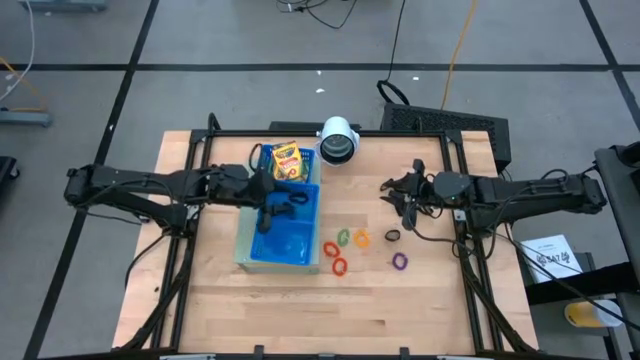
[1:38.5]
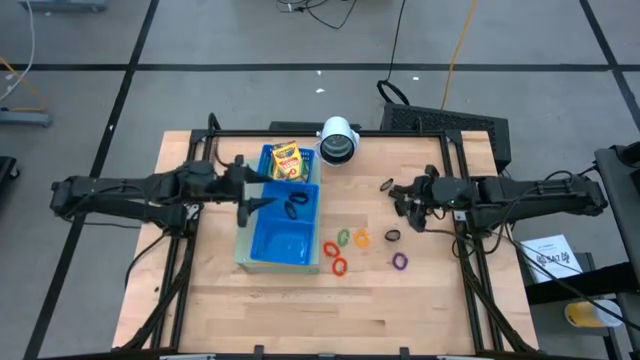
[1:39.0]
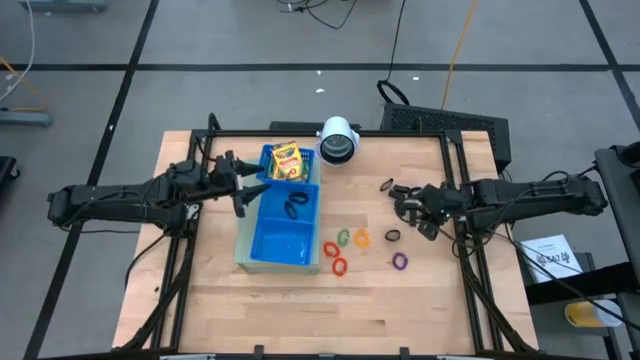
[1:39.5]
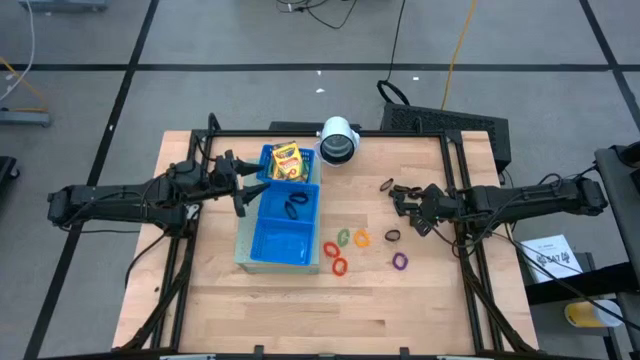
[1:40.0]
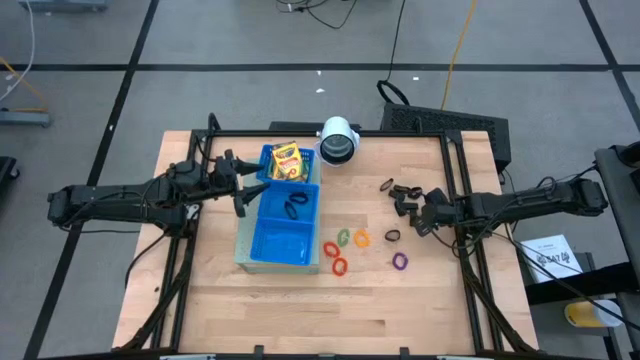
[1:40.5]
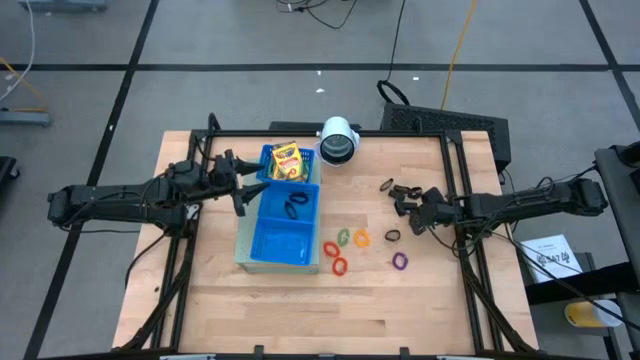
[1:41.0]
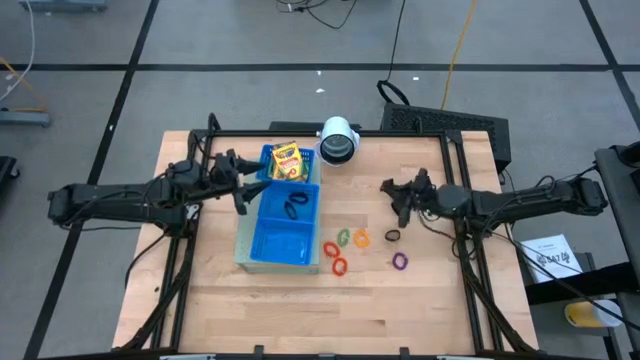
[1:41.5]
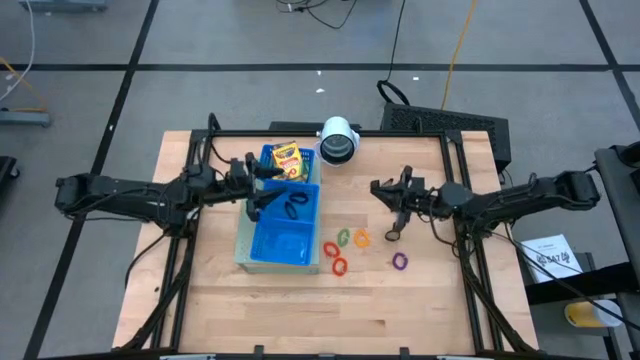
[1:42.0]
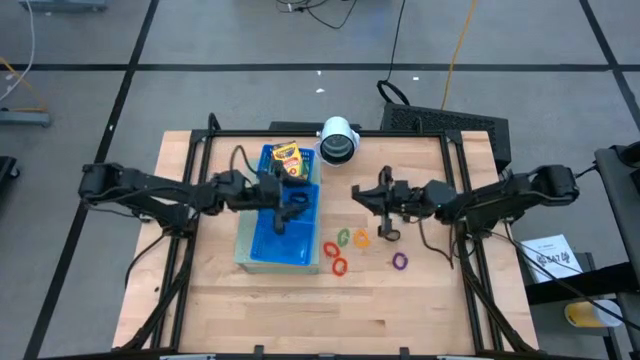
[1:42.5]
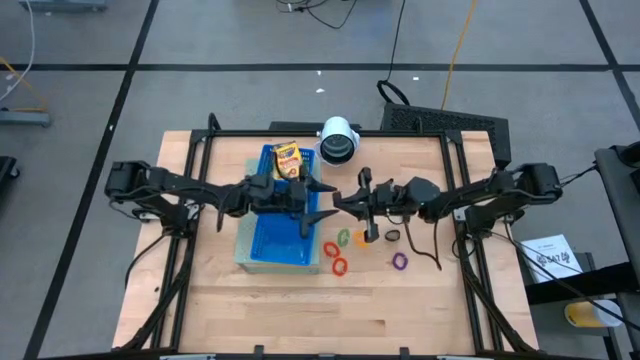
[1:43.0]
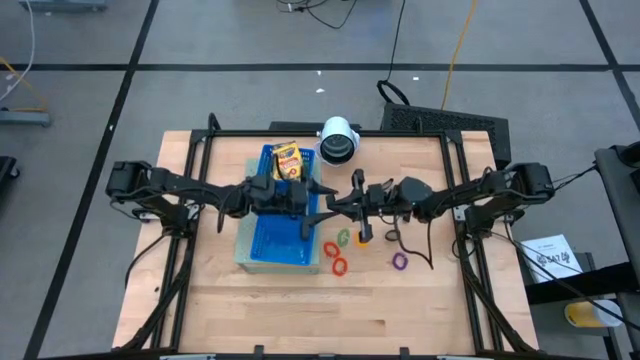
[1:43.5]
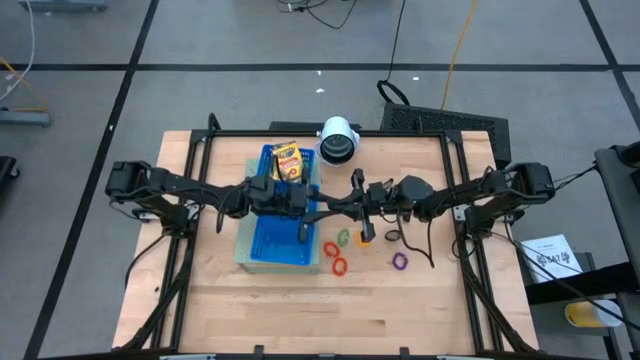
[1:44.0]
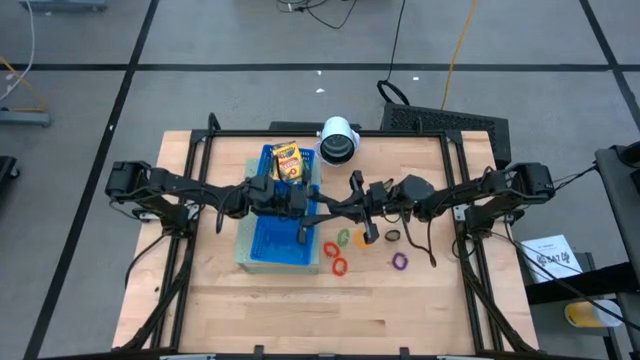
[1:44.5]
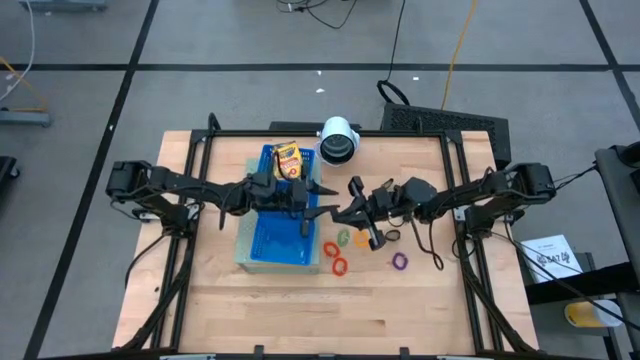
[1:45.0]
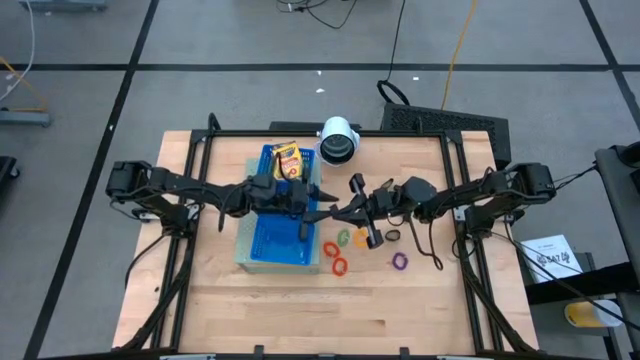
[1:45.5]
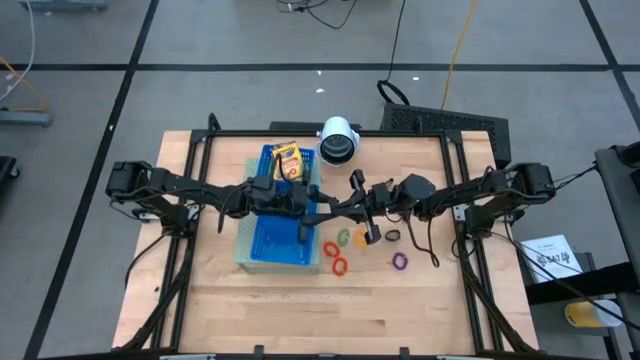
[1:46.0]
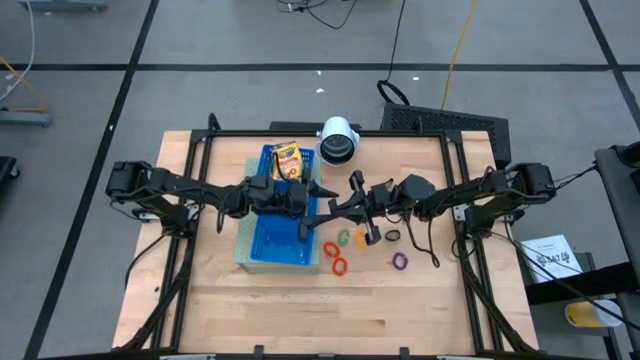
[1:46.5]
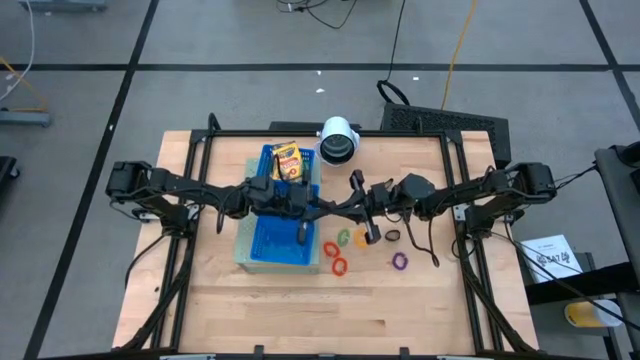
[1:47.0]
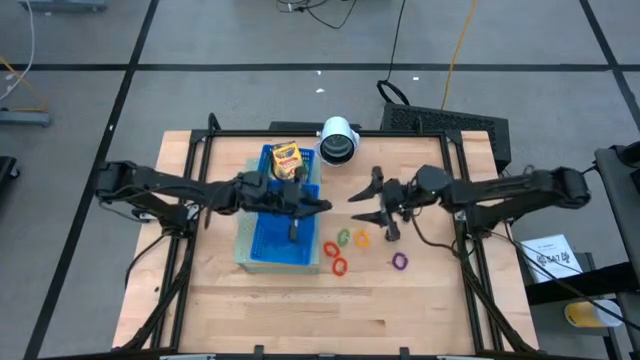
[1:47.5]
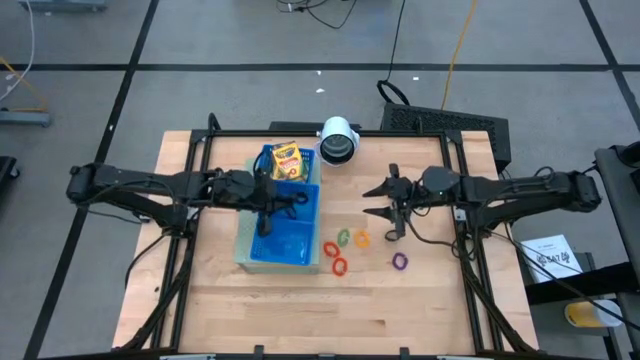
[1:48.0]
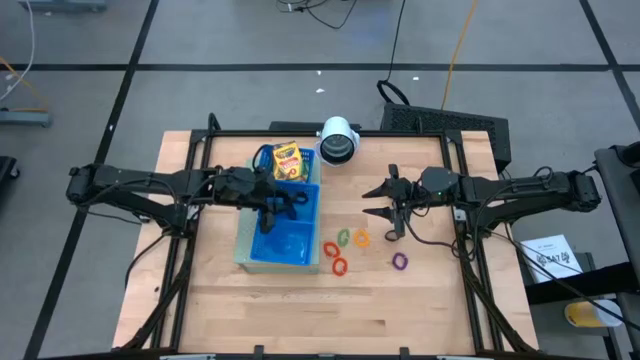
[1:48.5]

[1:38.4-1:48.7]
Task: Pick & Place Office Desk Supplies
Put the black rubber band into the middle blue bin on the shelf

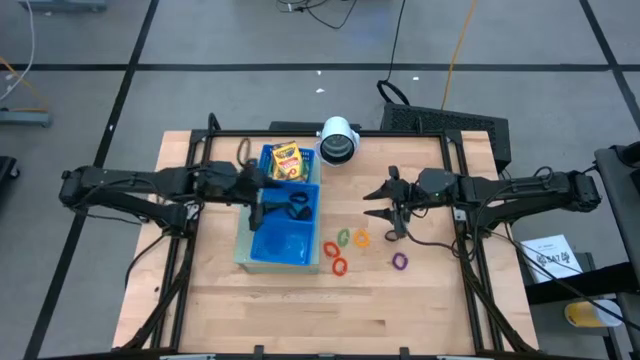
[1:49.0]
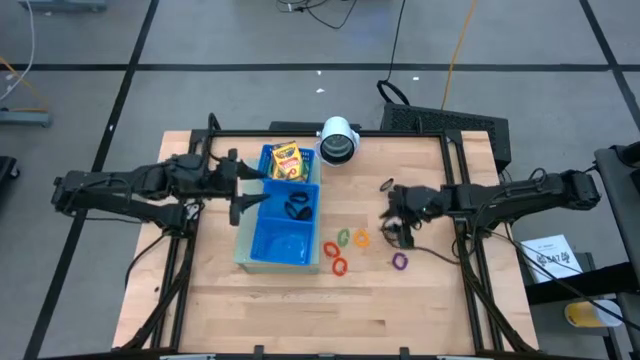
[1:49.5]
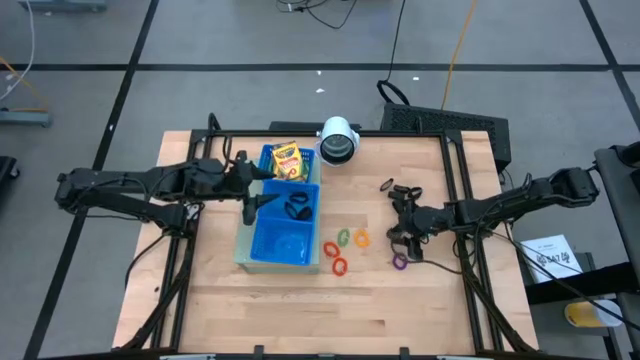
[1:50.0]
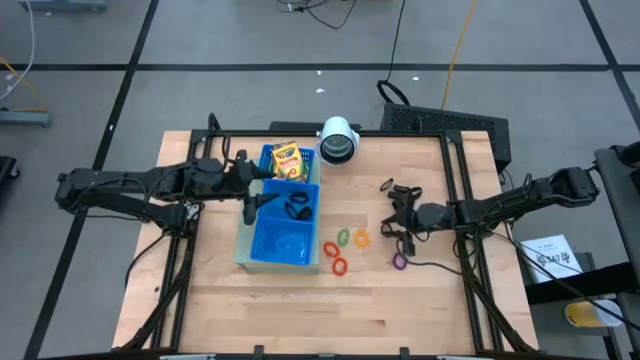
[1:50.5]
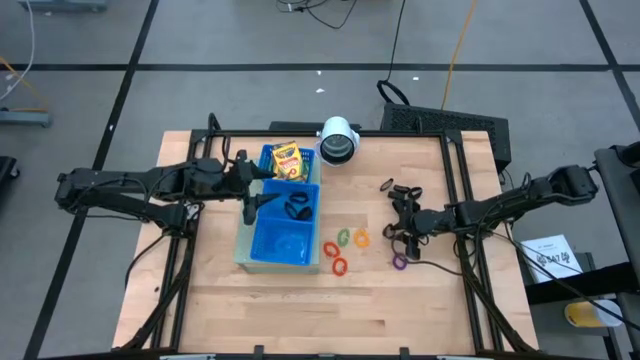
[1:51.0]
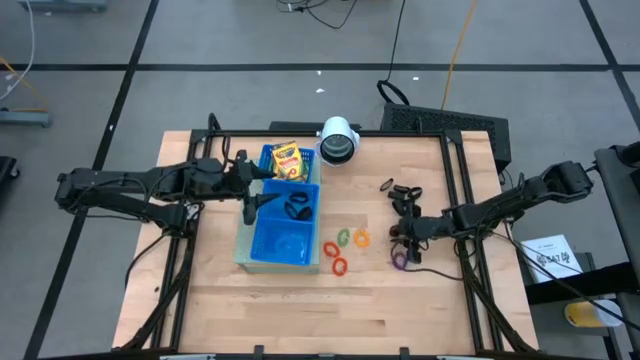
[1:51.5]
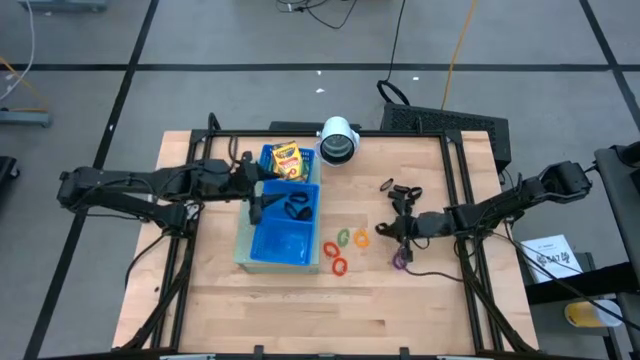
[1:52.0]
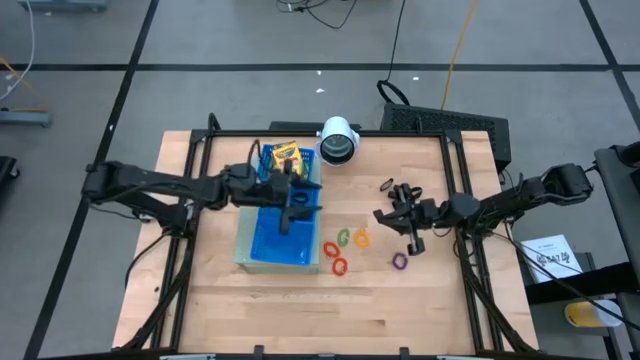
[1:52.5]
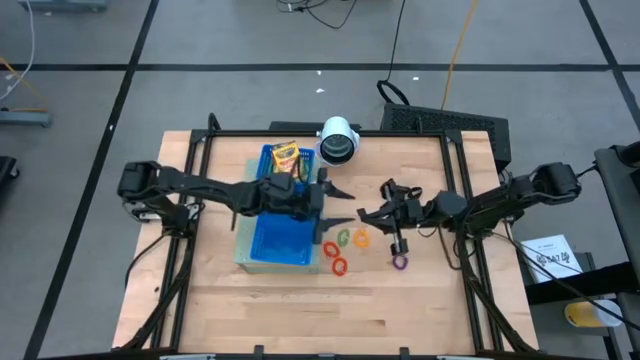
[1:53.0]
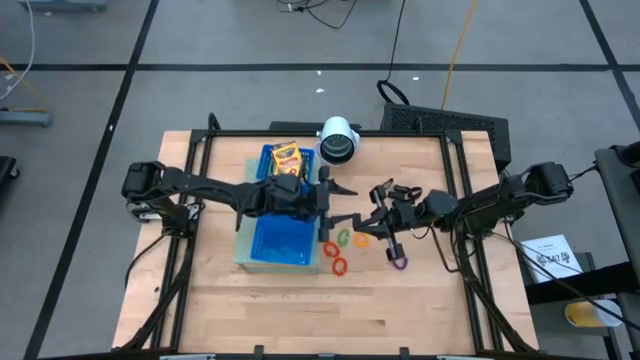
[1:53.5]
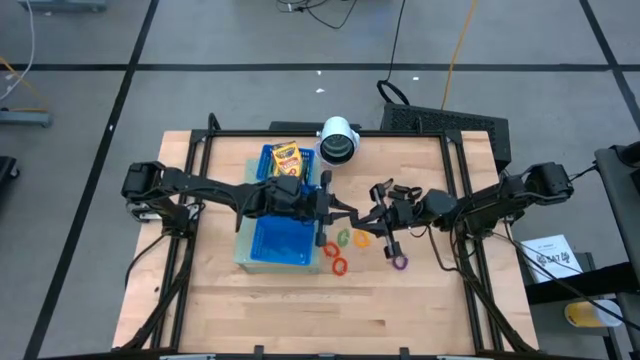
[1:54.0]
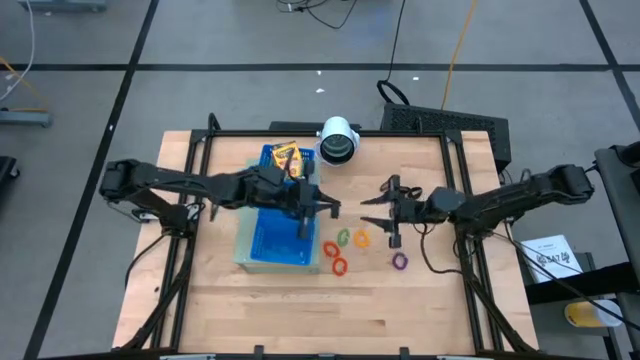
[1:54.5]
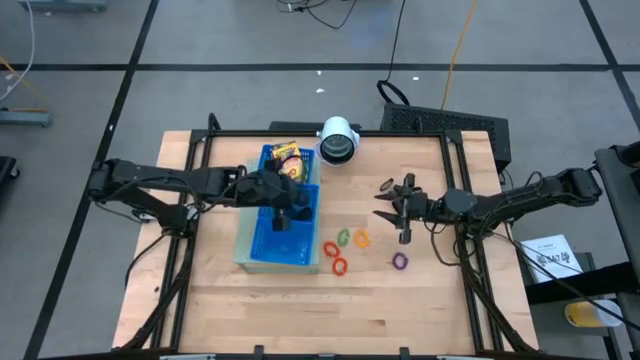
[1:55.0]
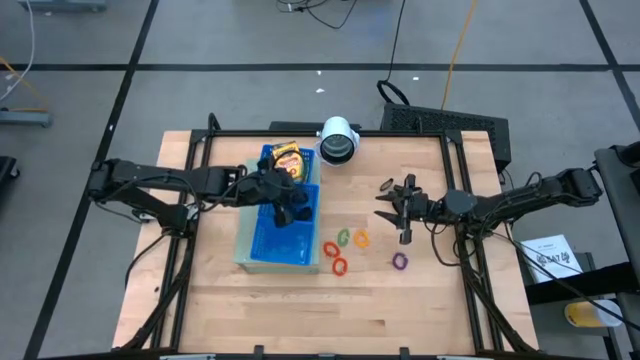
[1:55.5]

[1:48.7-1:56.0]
Put the black rubber band into the middle blue bin on the shelf

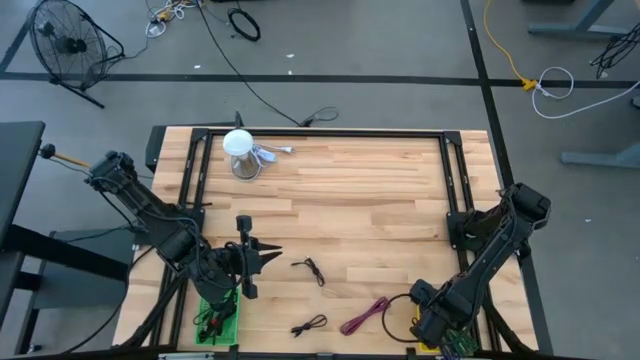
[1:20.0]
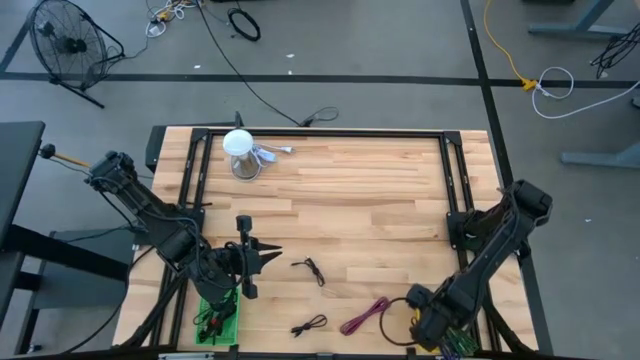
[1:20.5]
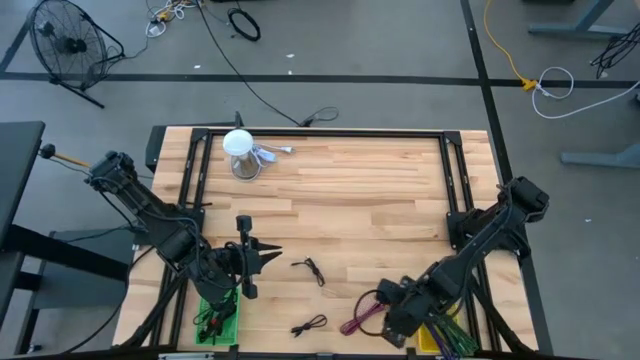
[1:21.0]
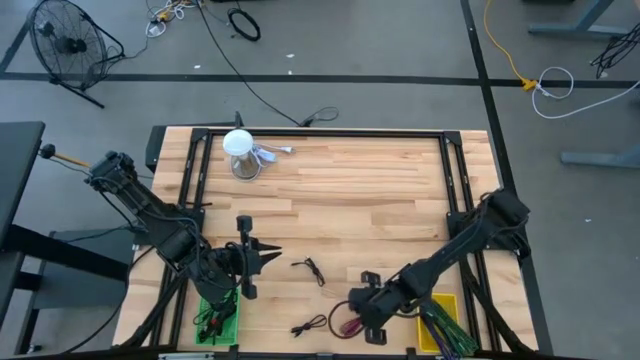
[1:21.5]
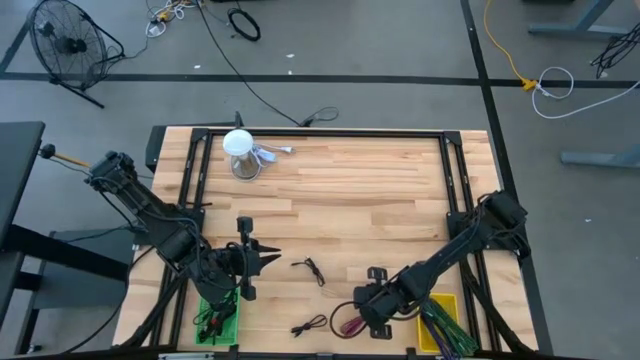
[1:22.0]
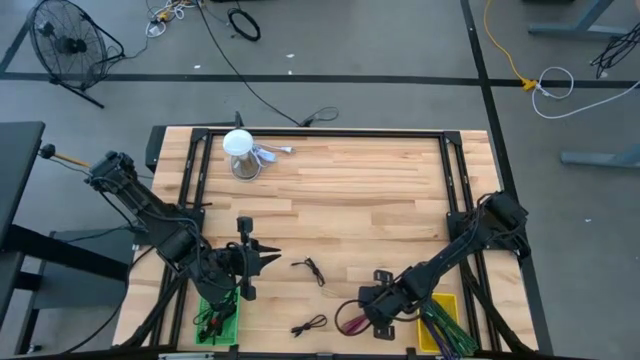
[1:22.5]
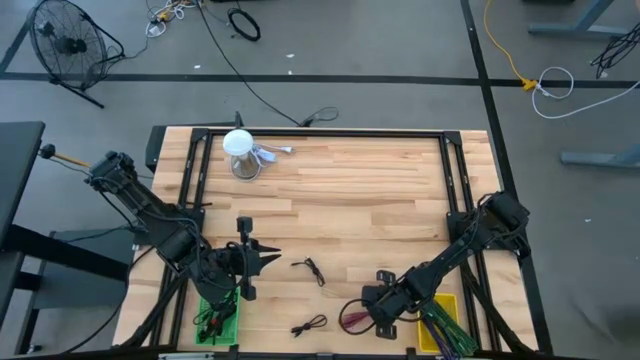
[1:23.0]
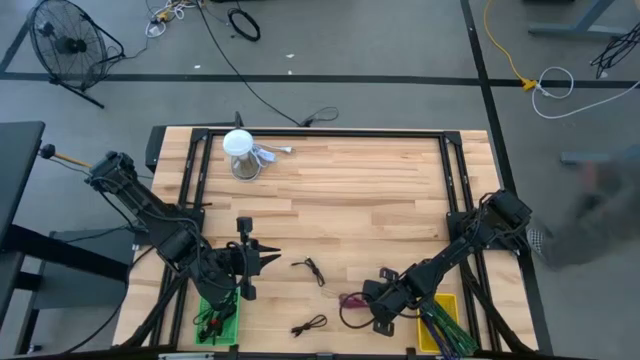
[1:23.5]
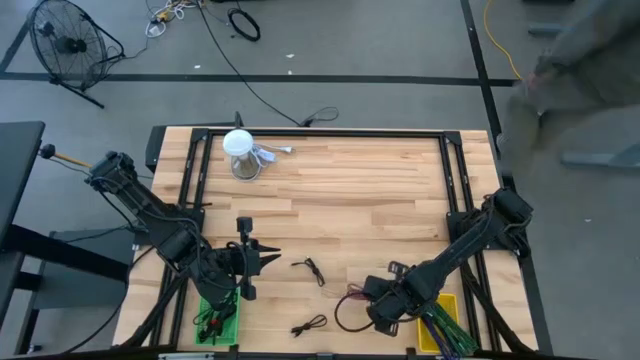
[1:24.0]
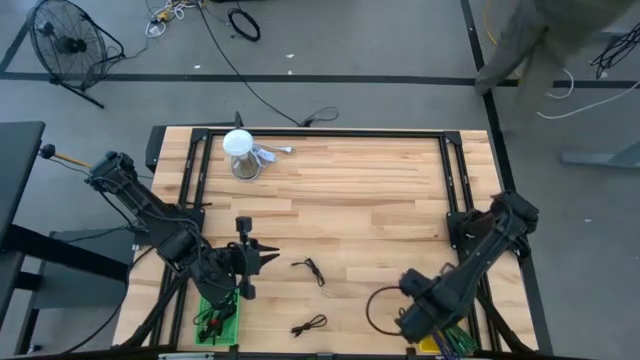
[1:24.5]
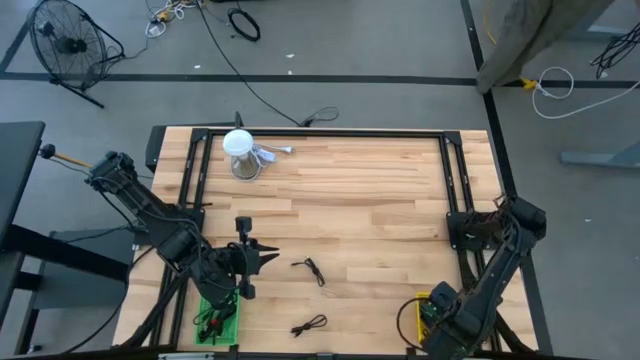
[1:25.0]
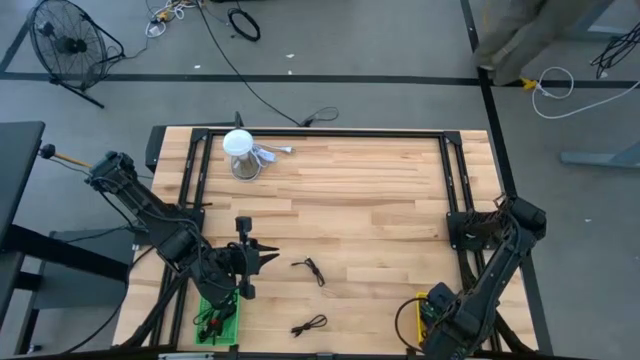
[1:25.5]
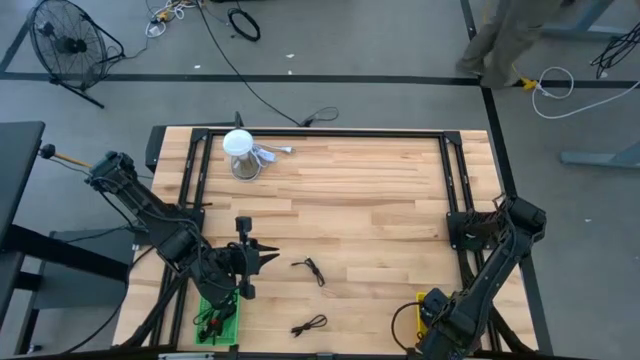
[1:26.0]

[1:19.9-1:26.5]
Task: Pick & Place USB Port
Put the black pink charger cable into the yellow bin
